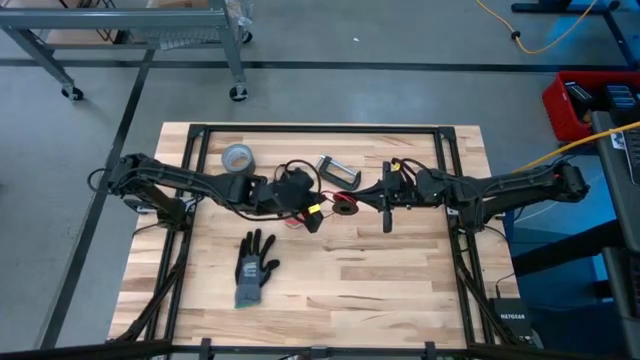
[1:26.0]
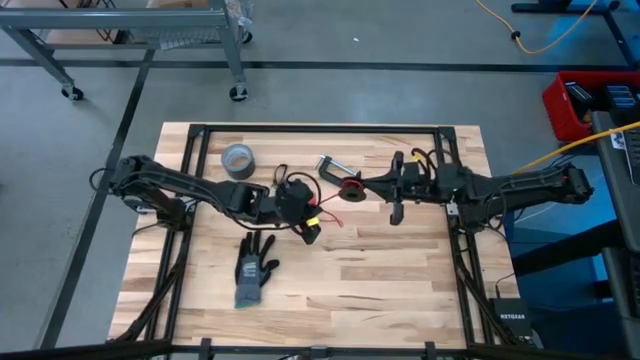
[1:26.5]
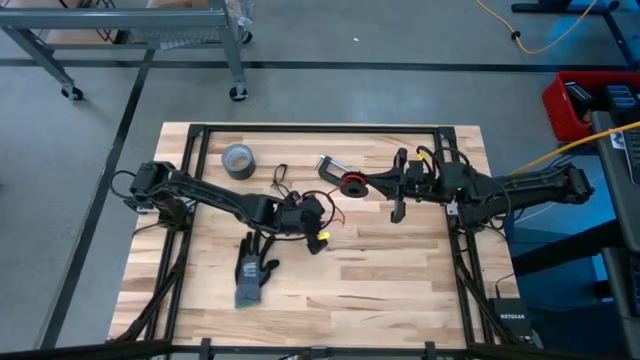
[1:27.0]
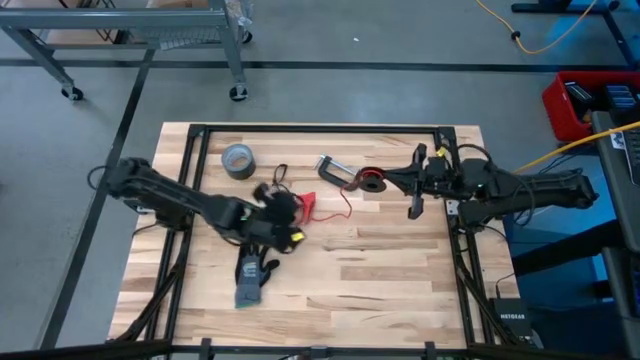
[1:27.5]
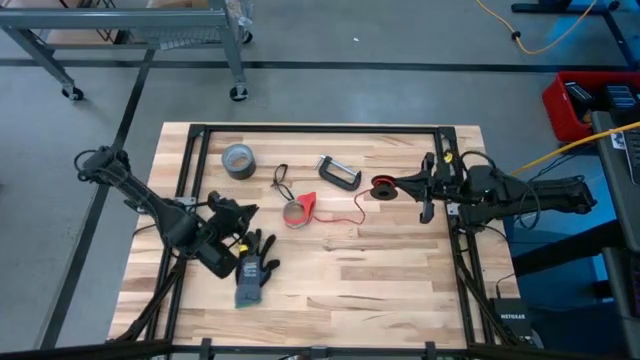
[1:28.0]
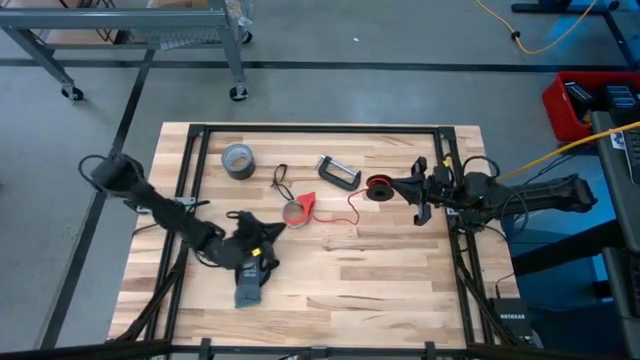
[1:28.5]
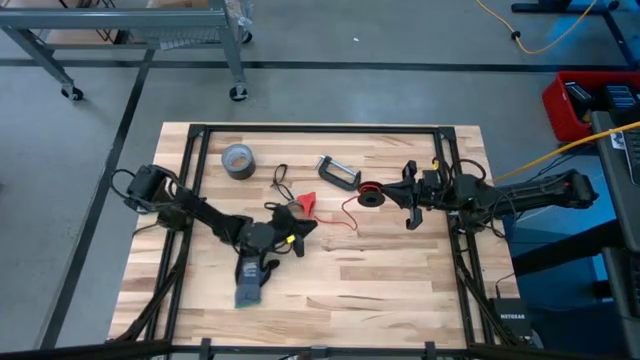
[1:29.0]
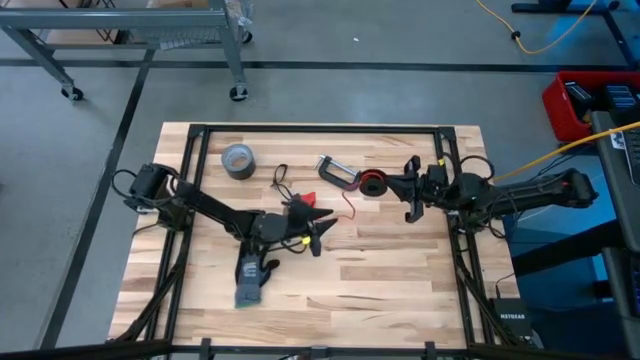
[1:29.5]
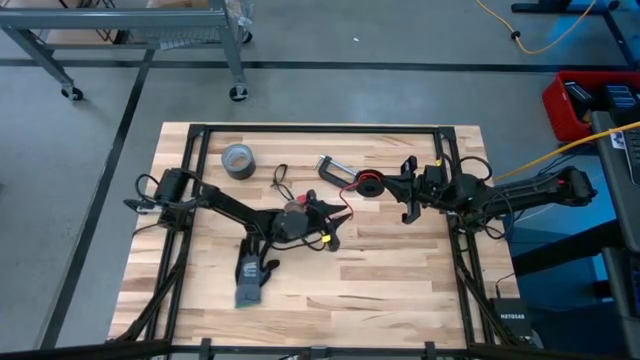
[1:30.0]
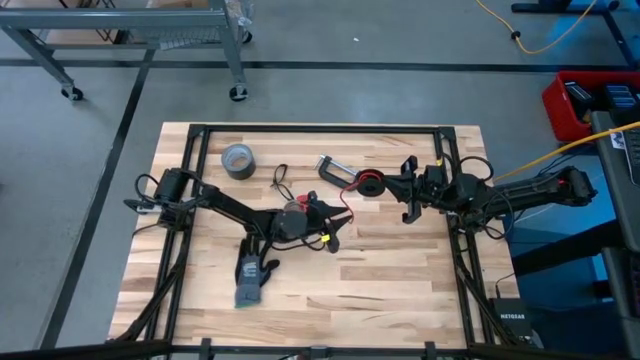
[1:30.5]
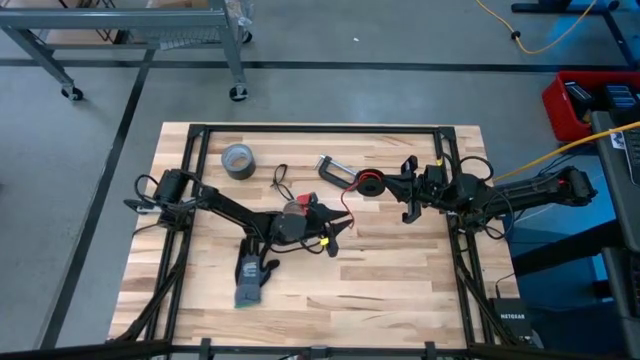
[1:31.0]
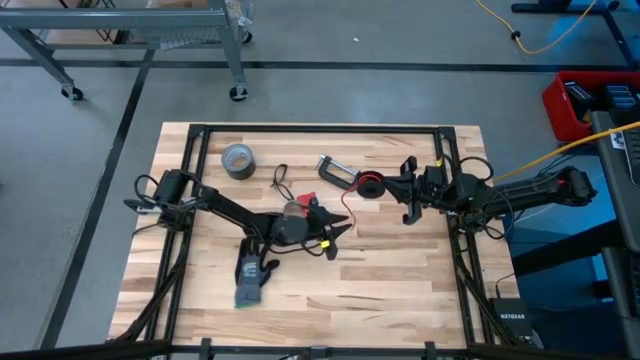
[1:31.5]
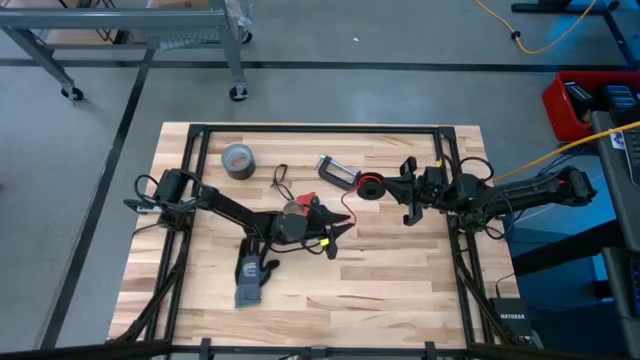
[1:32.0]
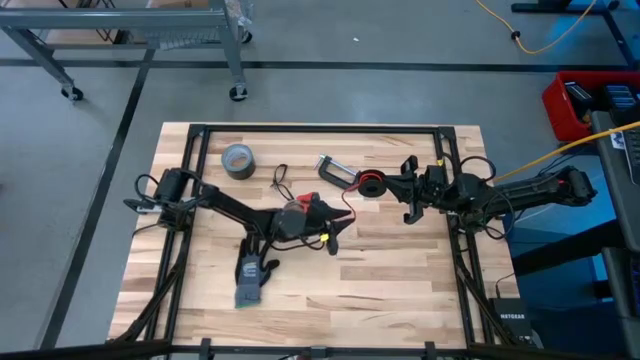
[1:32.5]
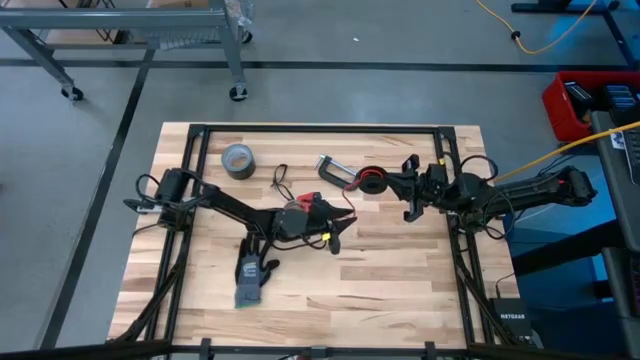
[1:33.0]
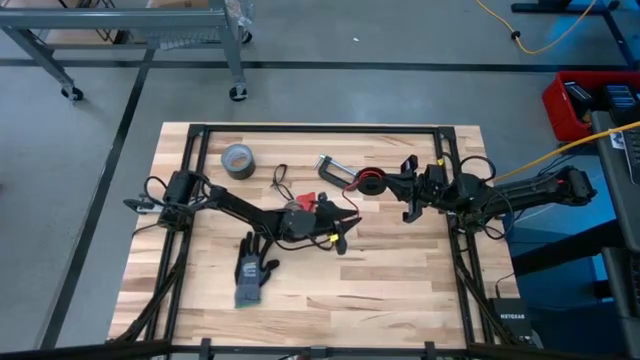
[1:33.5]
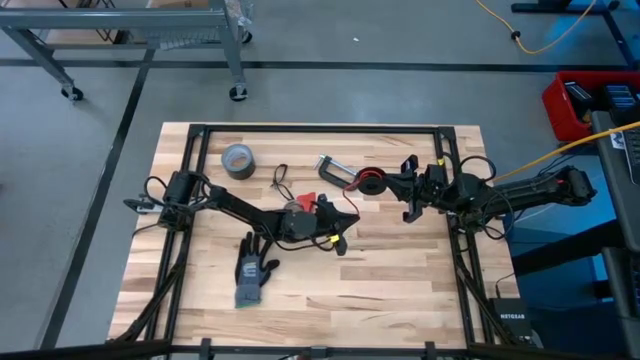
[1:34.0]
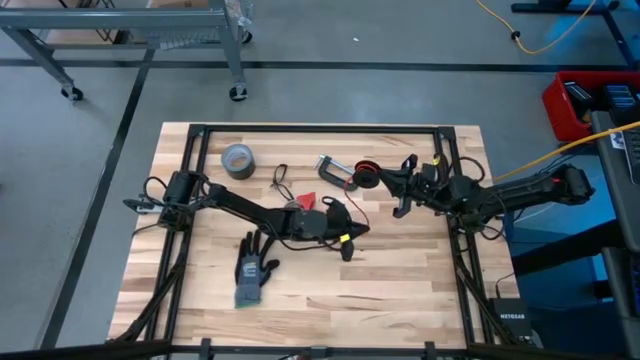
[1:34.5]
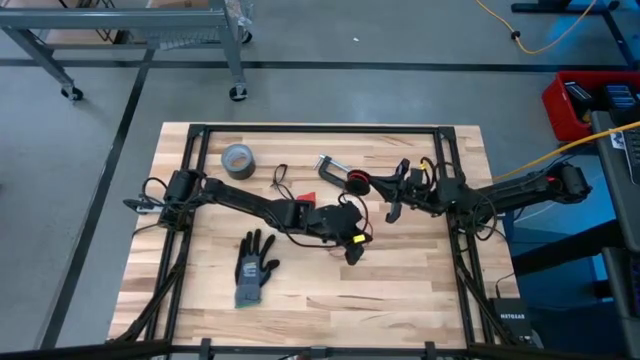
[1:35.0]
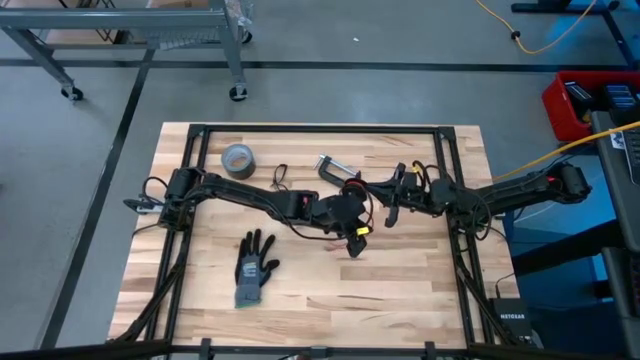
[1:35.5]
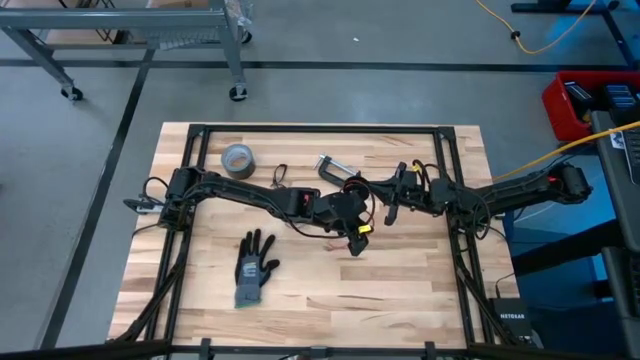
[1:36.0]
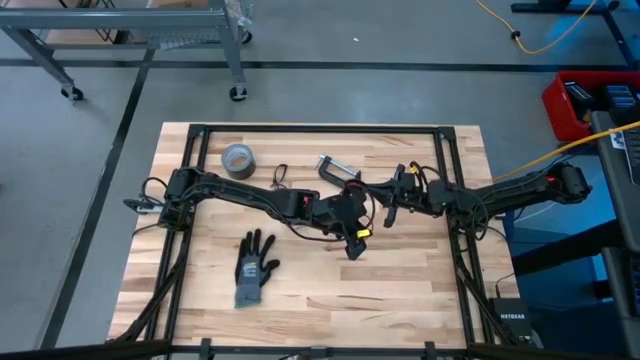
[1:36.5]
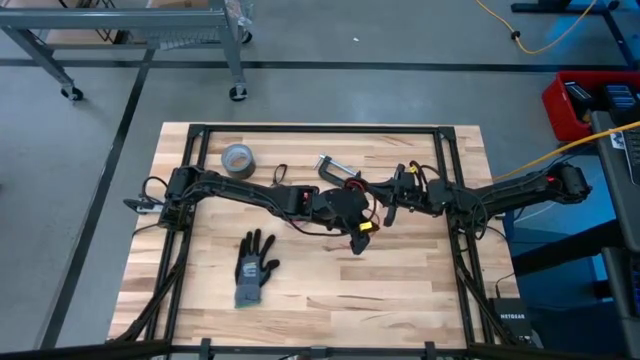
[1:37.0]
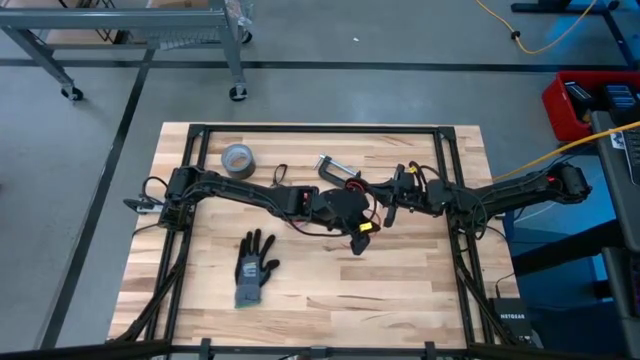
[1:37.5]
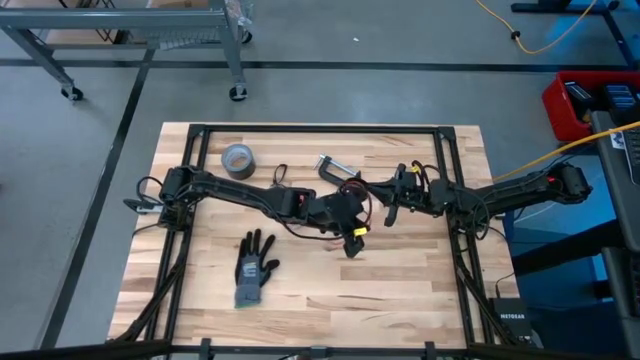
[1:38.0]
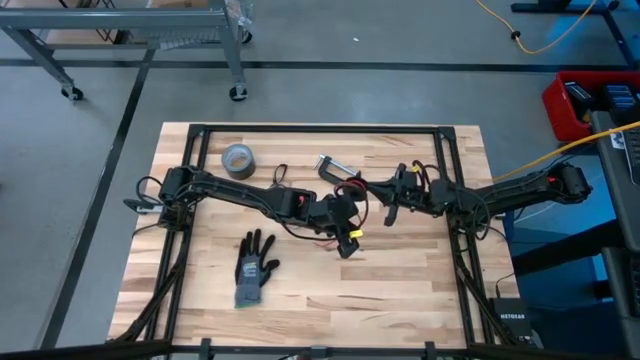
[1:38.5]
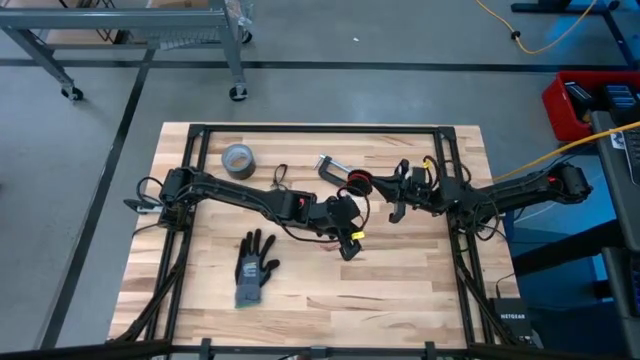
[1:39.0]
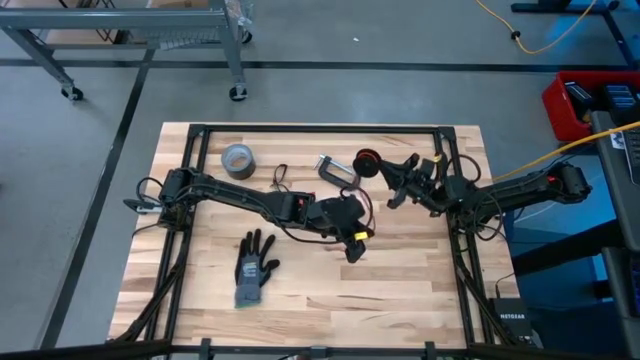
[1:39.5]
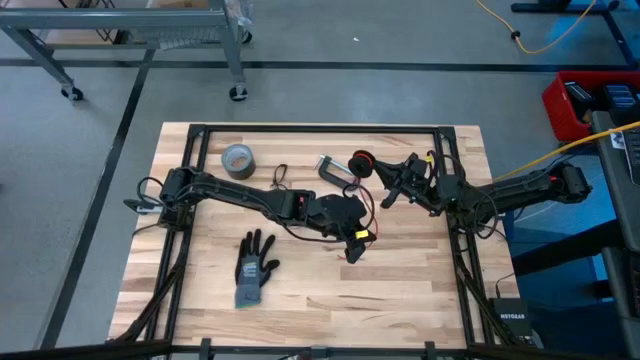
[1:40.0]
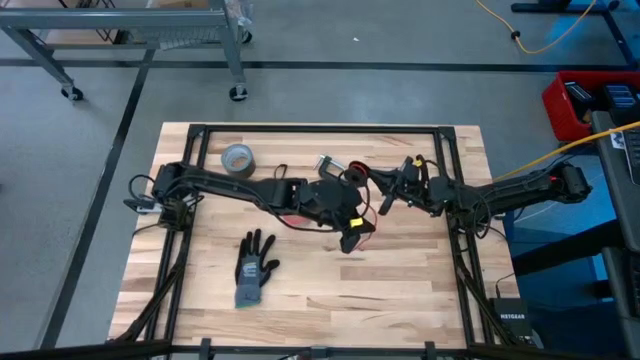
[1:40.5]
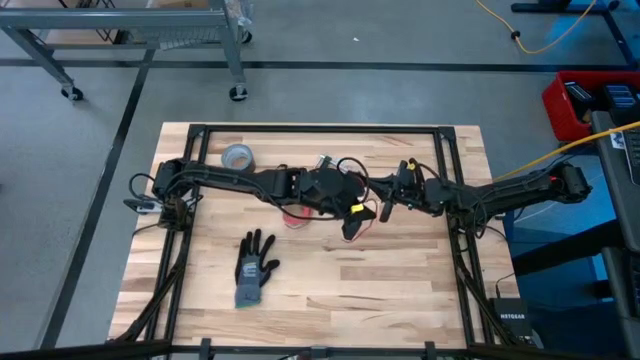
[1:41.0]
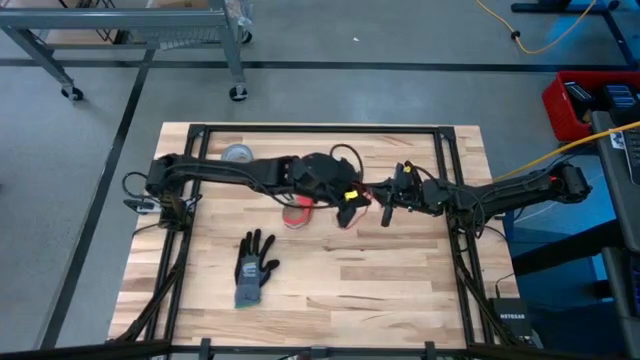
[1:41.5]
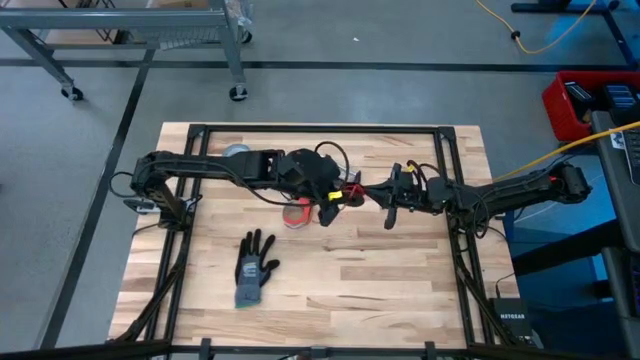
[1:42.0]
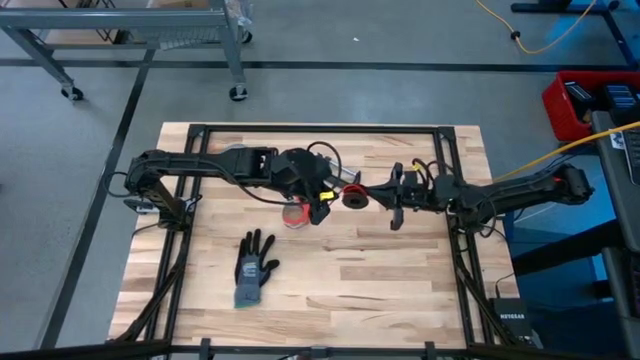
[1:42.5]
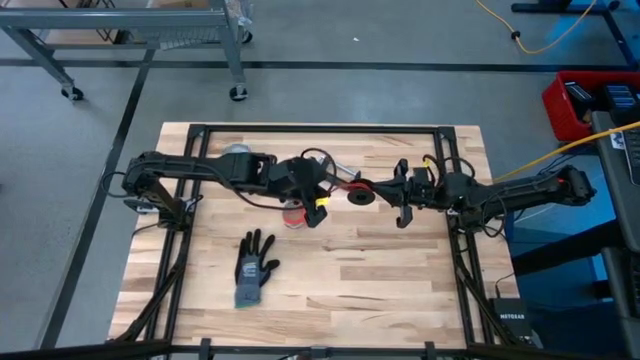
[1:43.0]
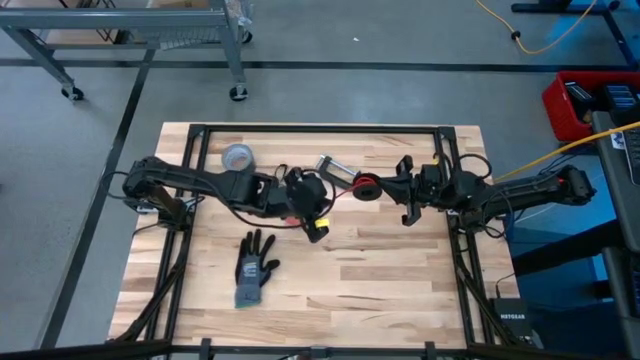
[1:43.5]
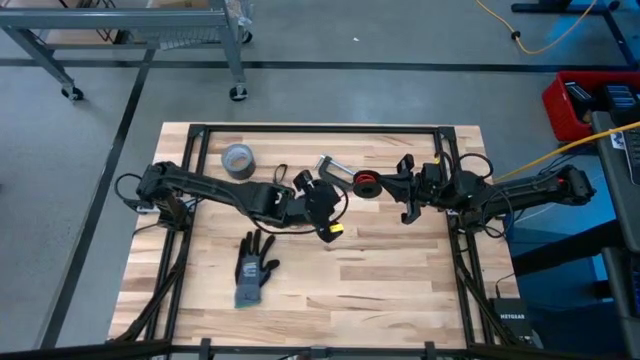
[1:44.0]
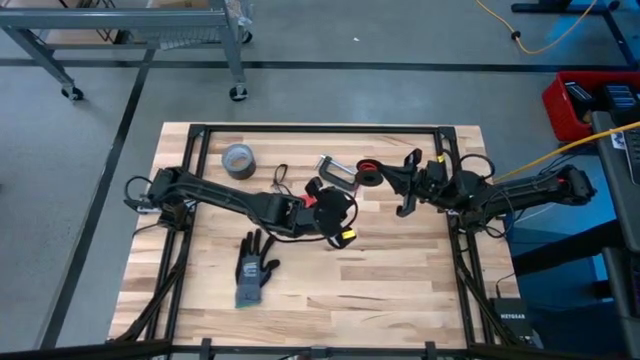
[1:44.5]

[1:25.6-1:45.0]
Task: Coil cords
Coil the red wire onto the spool
